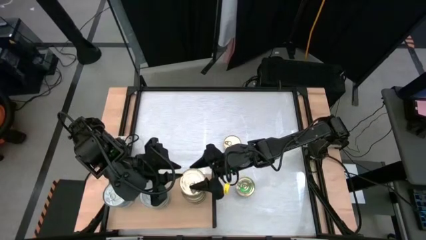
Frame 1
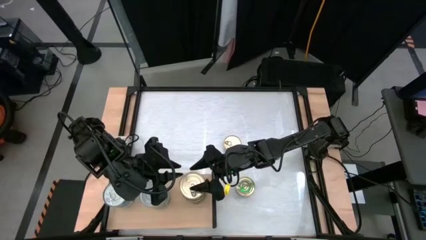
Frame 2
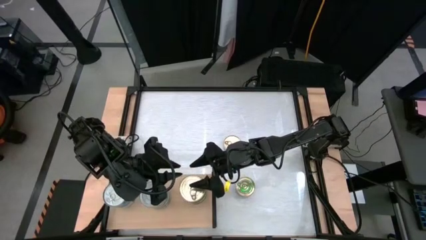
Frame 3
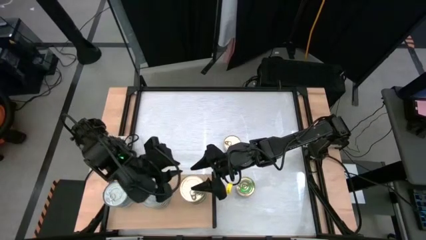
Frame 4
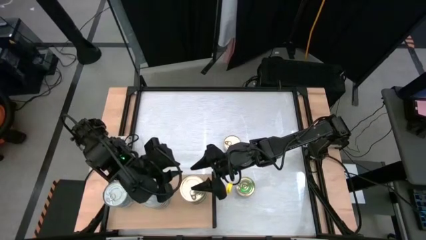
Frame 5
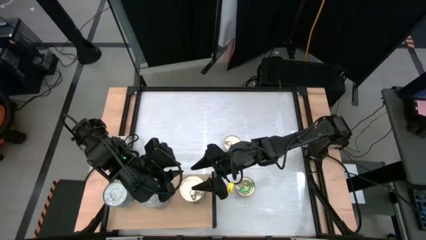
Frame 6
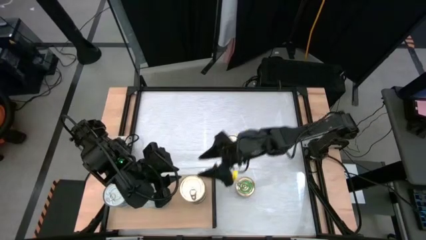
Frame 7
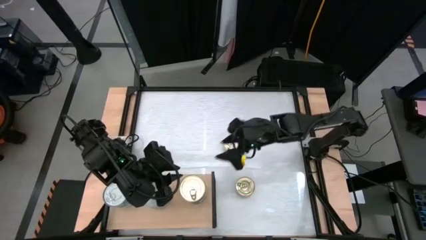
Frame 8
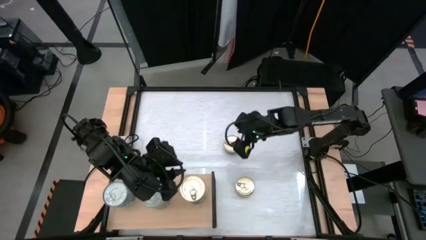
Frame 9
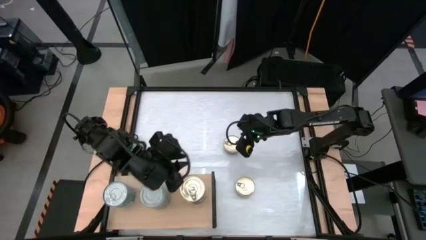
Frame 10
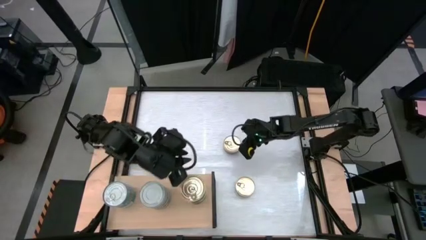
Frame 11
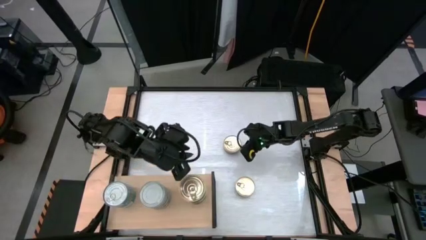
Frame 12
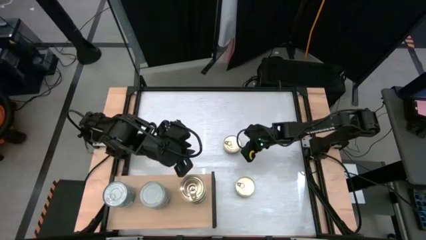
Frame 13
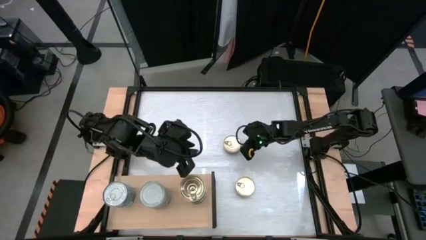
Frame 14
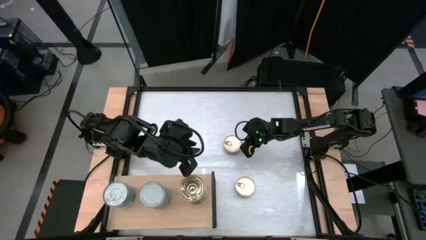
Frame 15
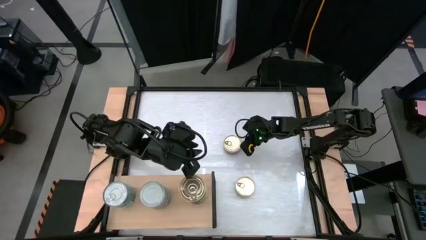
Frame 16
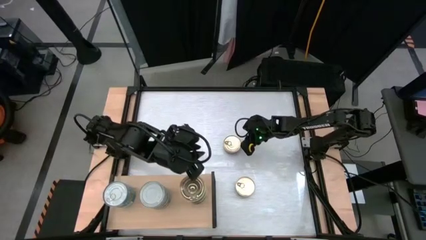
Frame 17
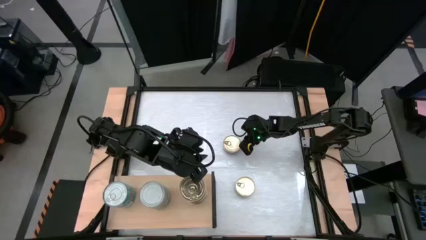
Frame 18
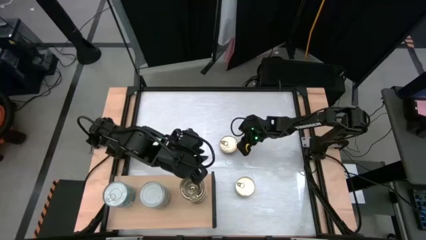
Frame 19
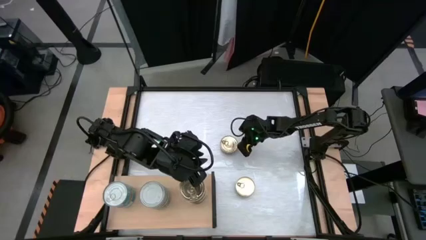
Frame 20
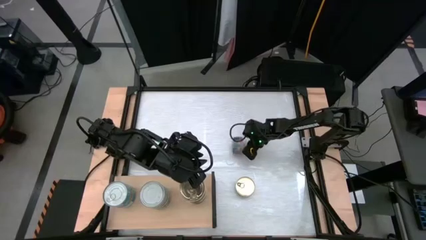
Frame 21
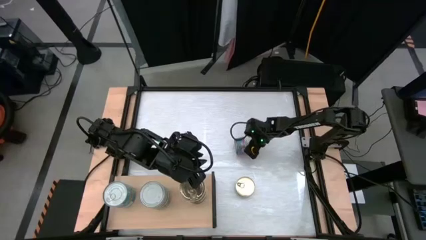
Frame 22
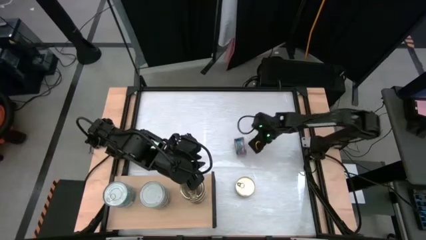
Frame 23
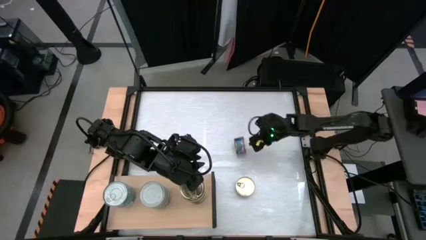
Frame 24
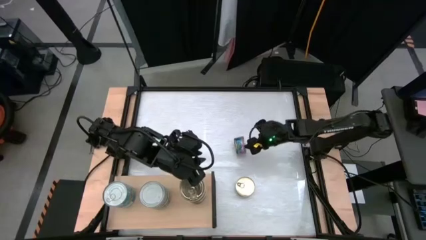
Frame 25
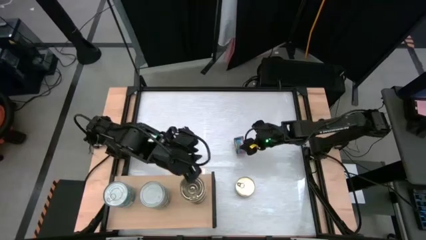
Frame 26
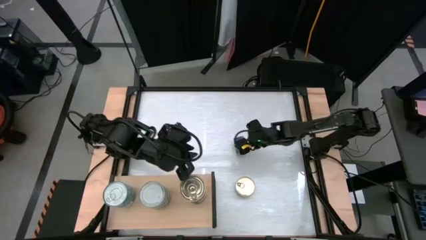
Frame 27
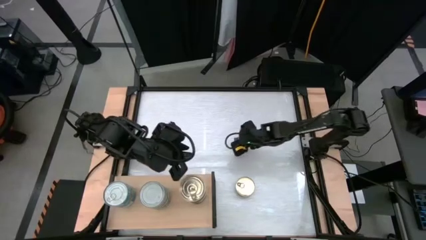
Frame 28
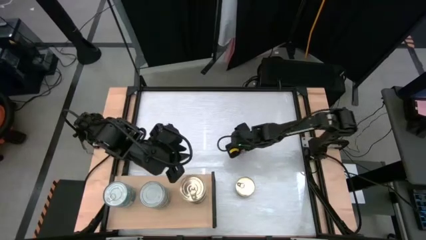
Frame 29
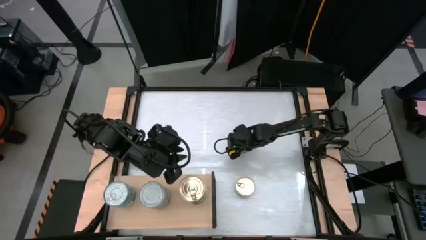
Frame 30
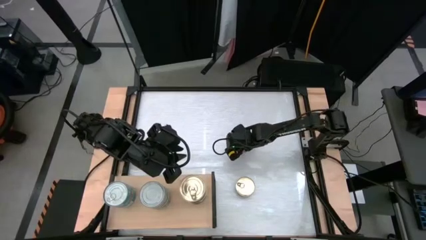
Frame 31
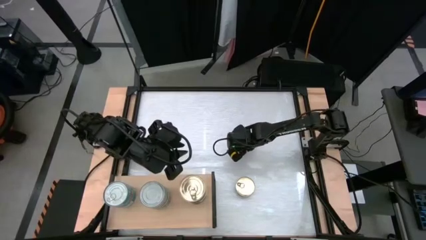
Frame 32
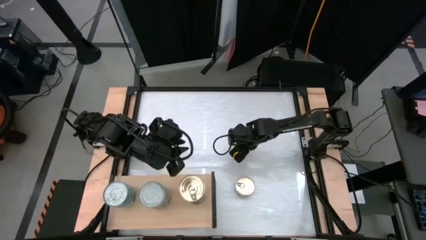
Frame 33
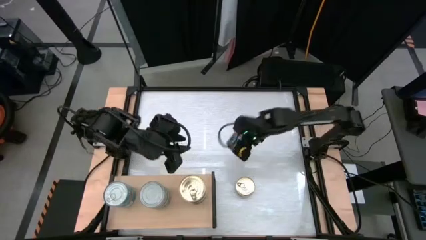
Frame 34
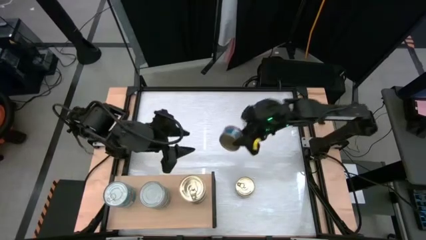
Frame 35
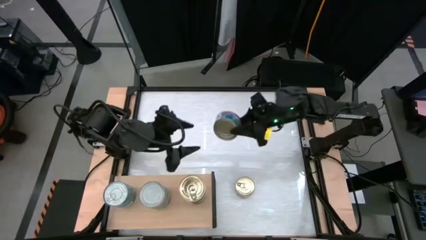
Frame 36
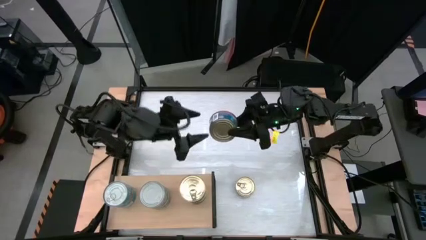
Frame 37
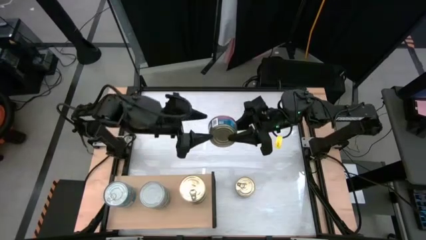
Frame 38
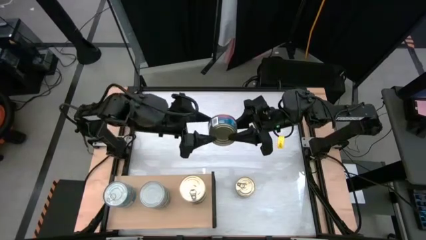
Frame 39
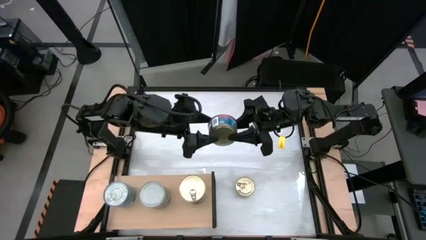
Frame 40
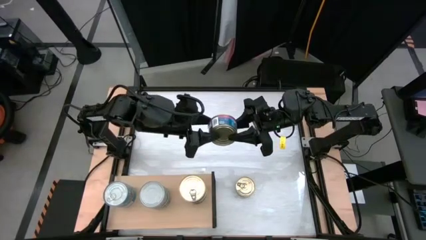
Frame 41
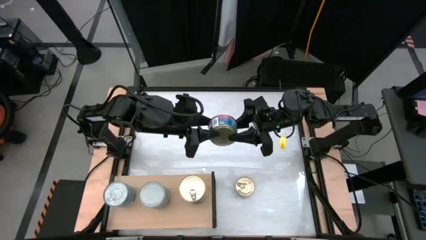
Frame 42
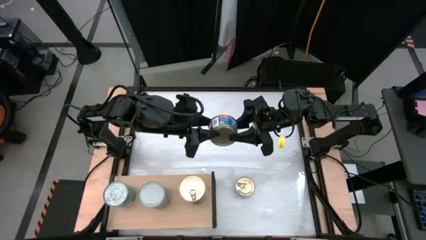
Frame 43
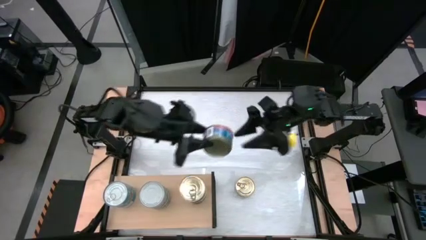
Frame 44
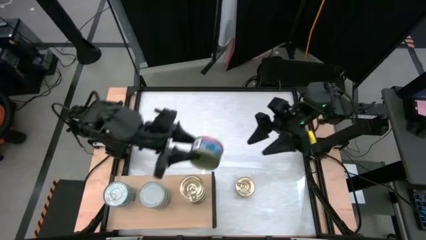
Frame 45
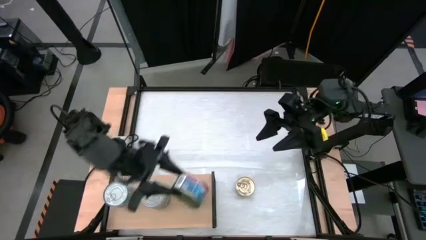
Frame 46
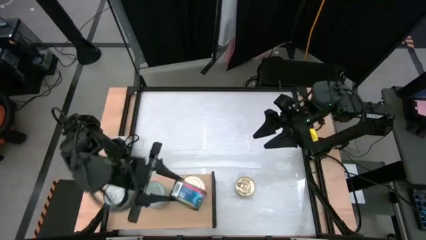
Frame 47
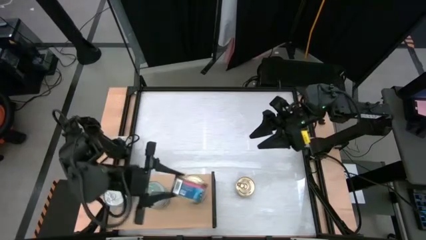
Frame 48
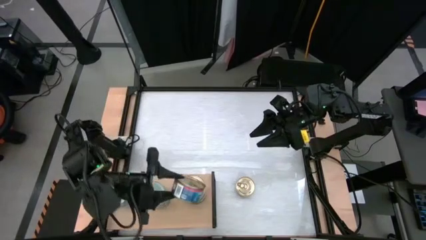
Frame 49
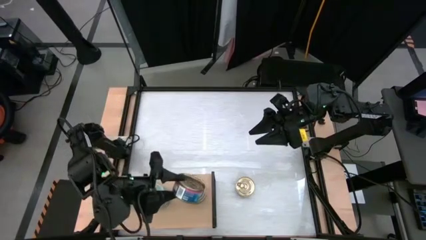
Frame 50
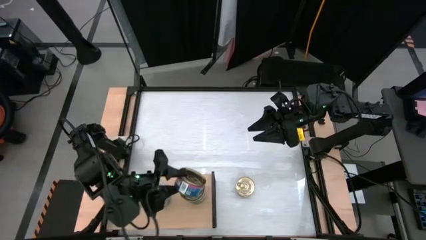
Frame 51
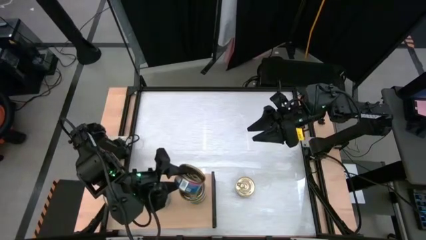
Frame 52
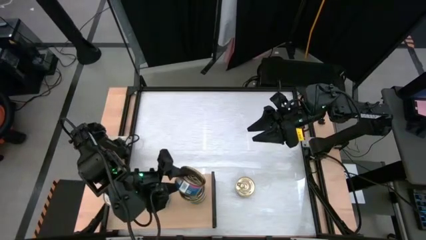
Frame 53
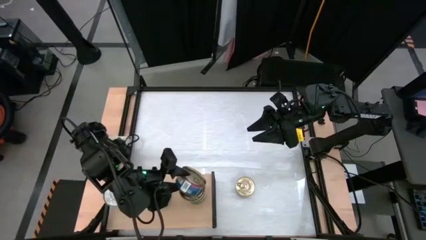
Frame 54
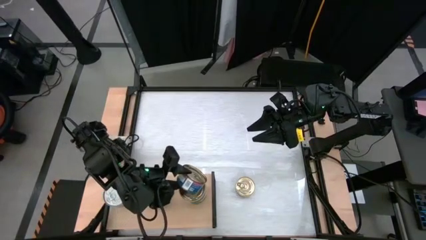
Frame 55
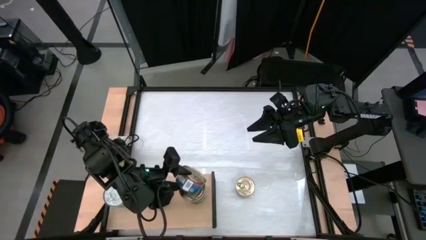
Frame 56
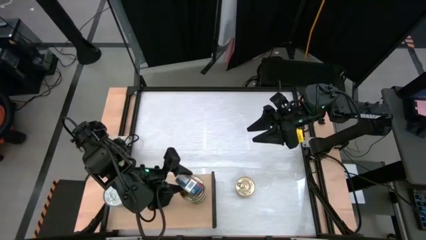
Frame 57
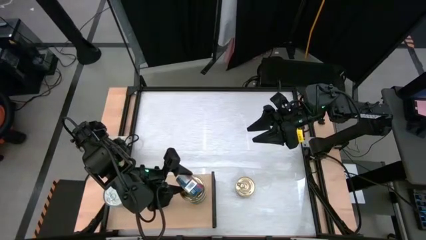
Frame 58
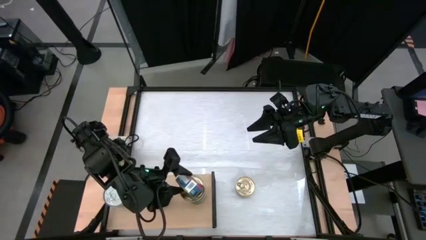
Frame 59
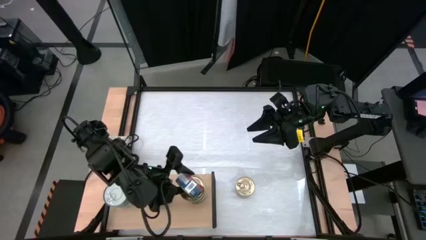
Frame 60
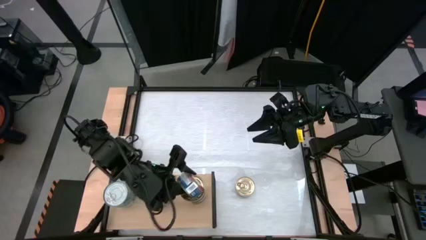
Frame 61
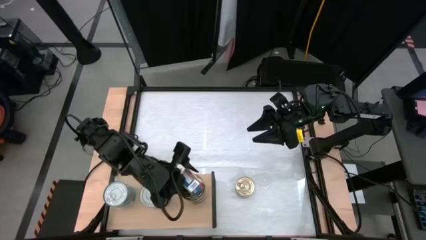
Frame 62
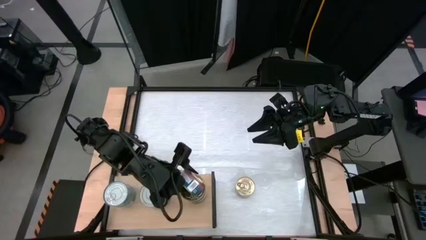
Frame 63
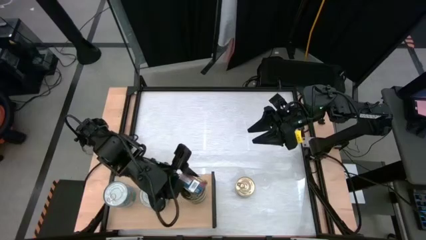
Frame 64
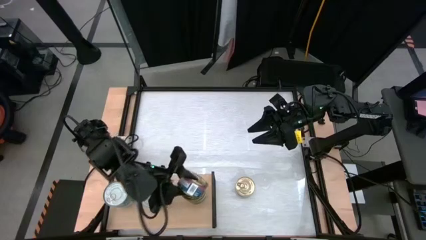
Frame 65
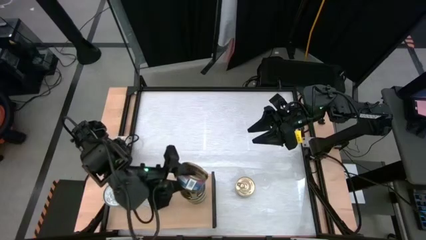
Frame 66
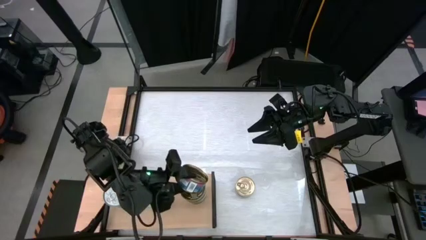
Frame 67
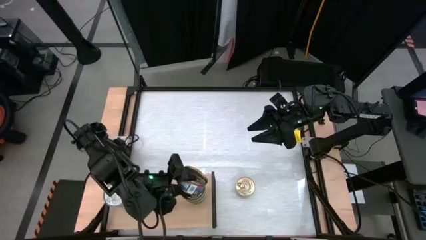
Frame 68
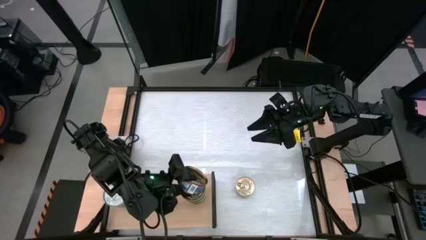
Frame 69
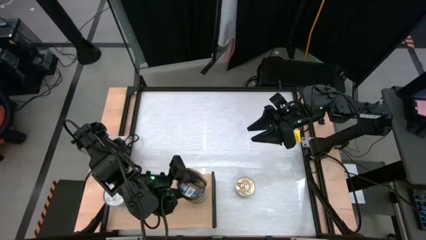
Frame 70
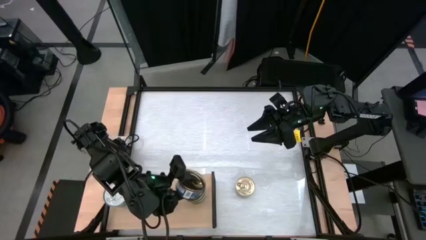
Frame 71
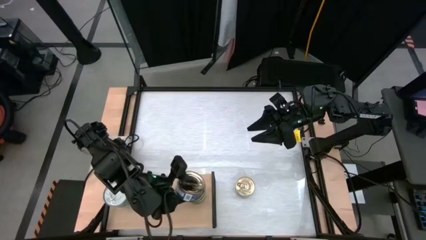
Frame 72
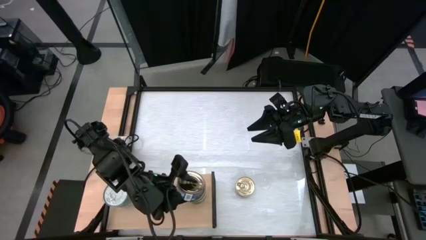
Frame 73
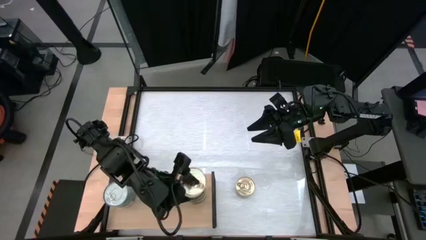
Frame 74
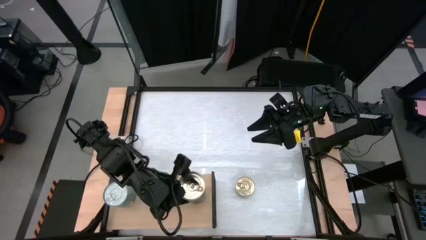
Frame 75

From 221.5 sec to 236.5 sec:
Task: Stack canned seafood by type on shelf
Stack the blue pink tuna can on top of the blue pink tuna can on the shelf
